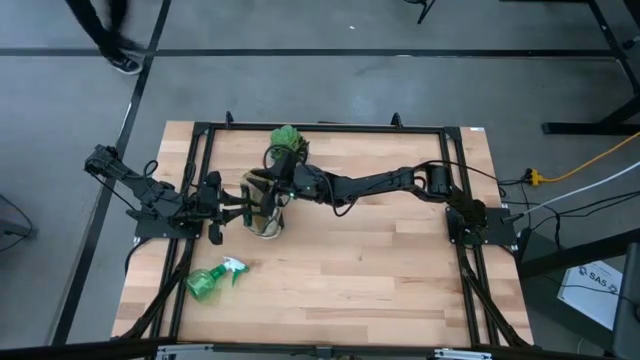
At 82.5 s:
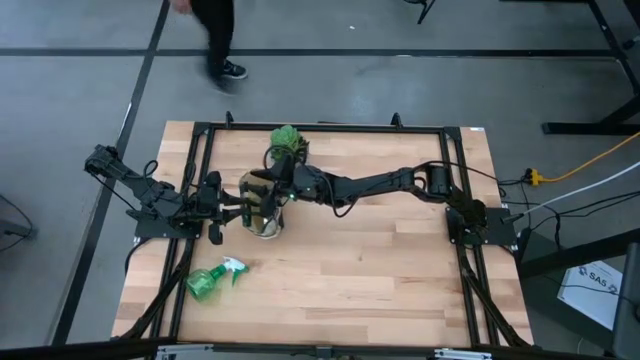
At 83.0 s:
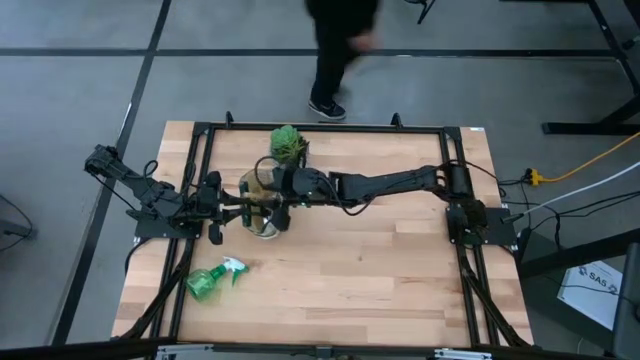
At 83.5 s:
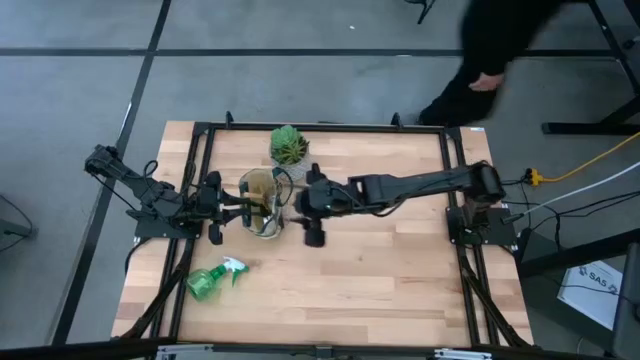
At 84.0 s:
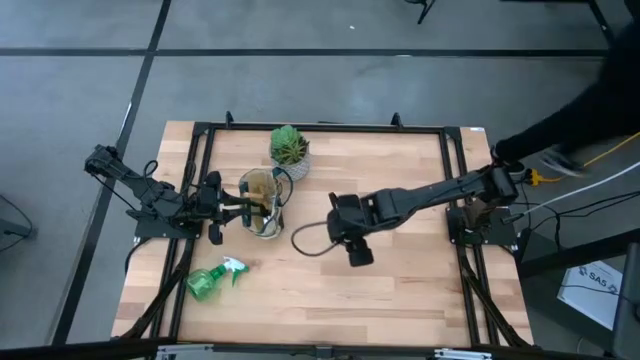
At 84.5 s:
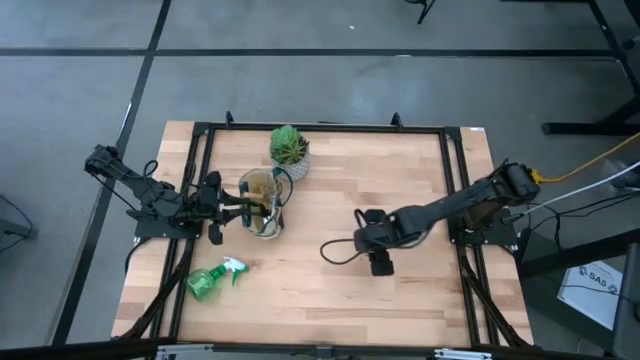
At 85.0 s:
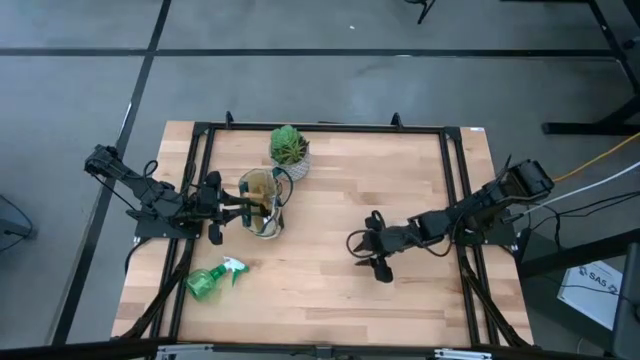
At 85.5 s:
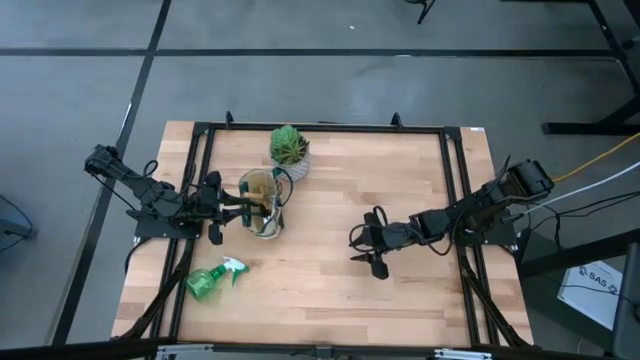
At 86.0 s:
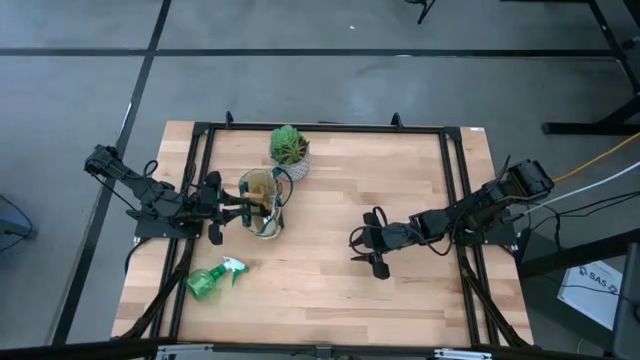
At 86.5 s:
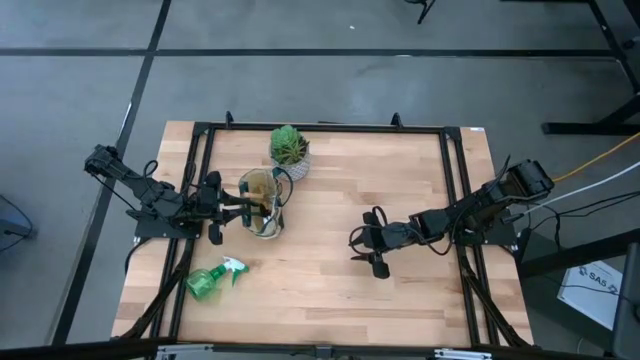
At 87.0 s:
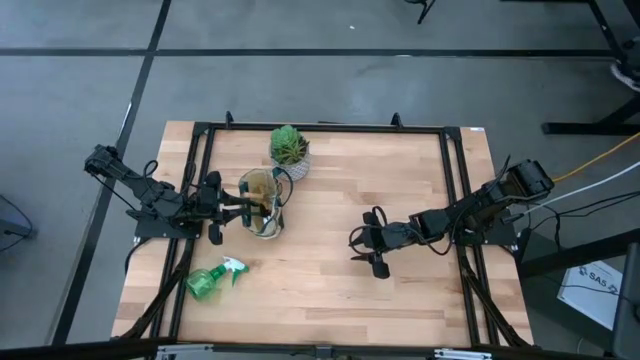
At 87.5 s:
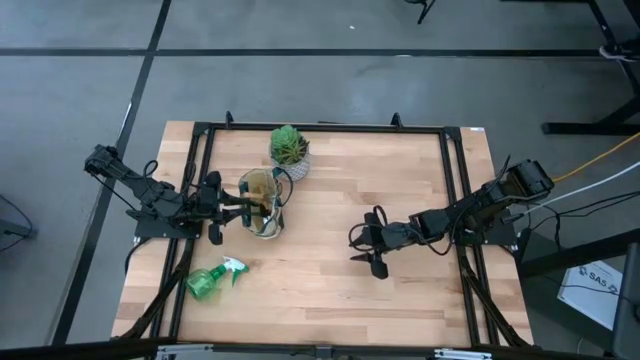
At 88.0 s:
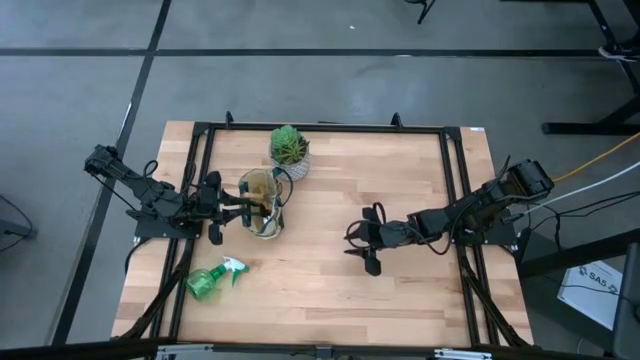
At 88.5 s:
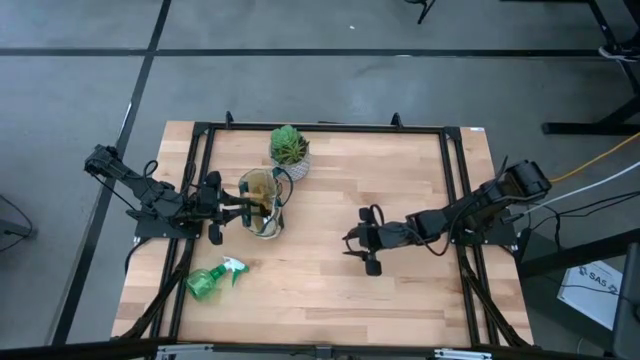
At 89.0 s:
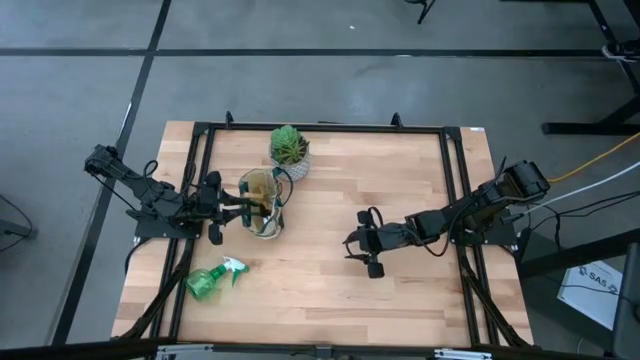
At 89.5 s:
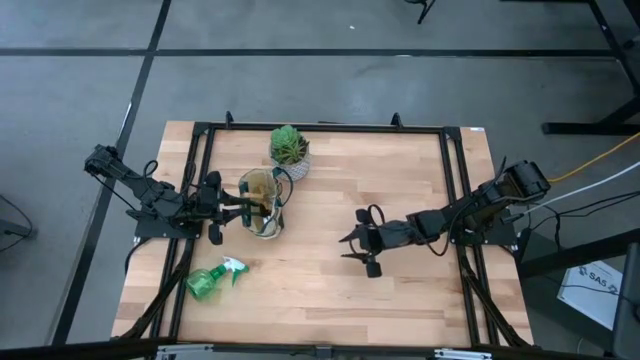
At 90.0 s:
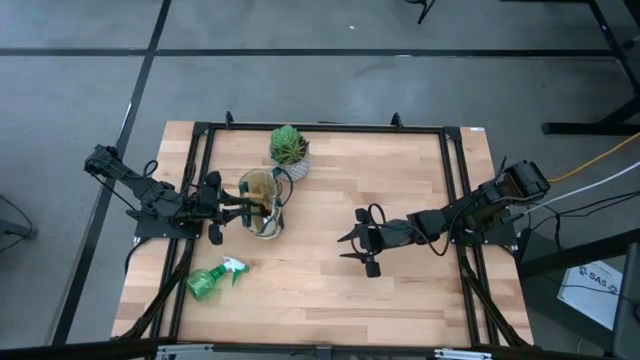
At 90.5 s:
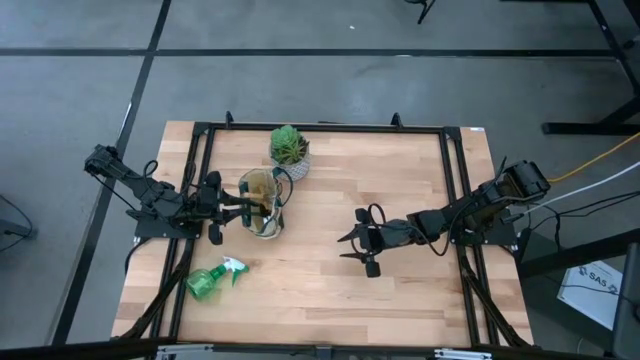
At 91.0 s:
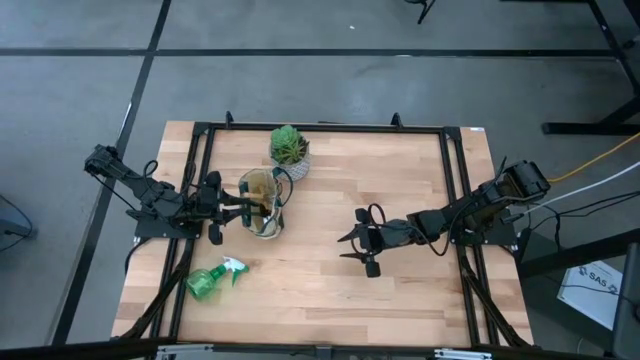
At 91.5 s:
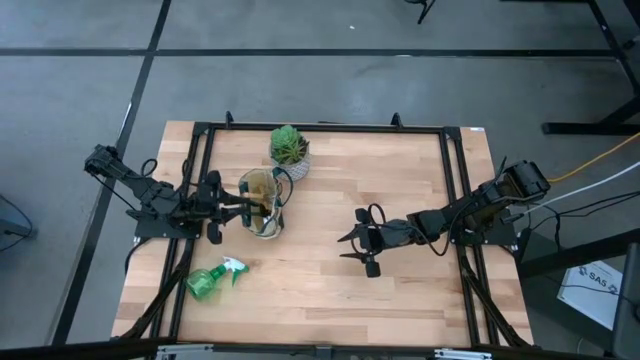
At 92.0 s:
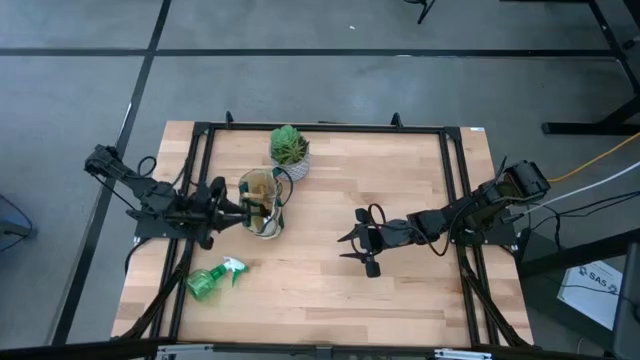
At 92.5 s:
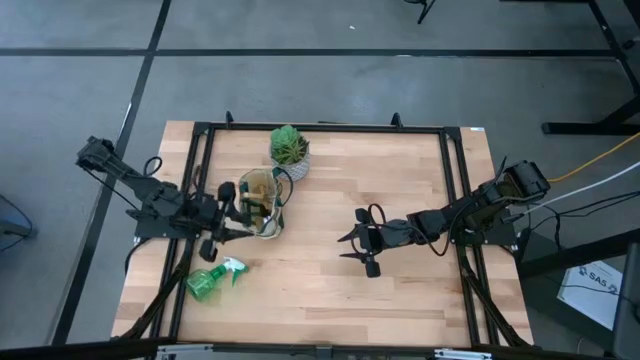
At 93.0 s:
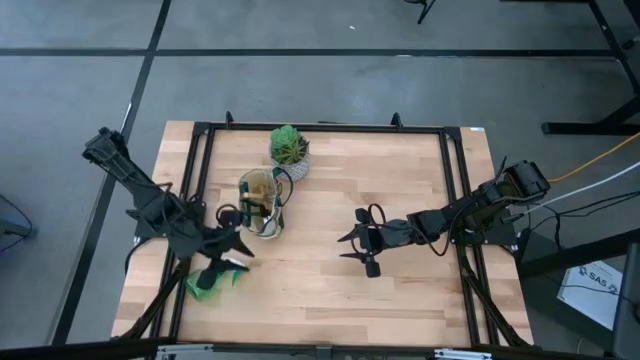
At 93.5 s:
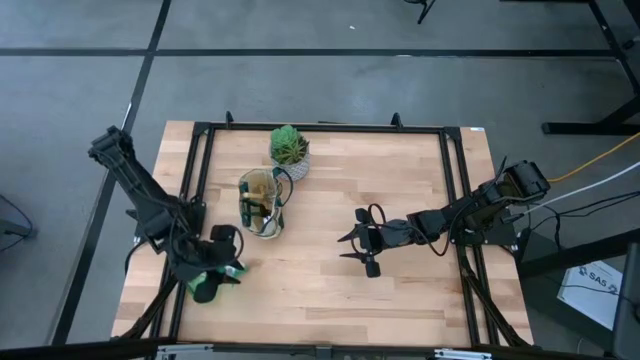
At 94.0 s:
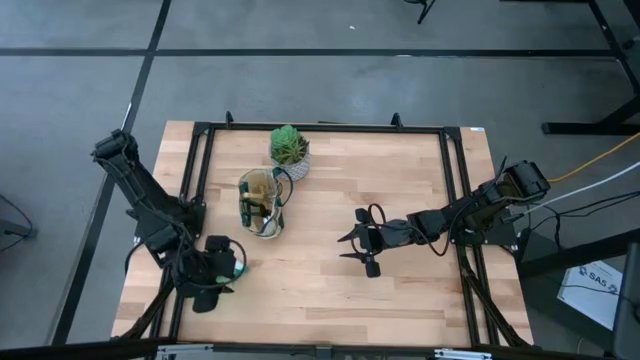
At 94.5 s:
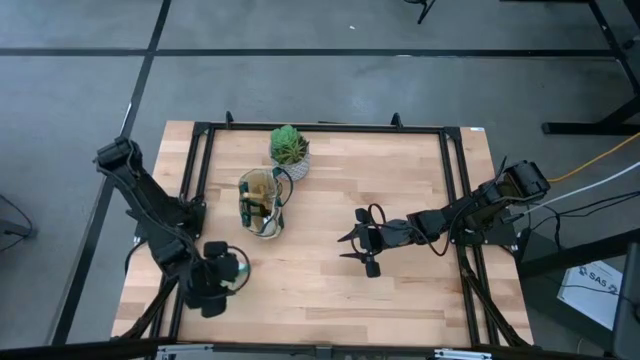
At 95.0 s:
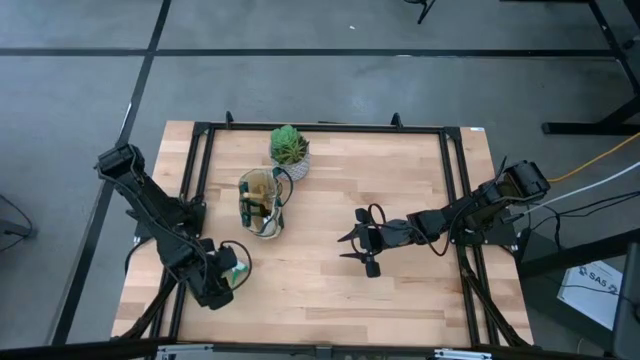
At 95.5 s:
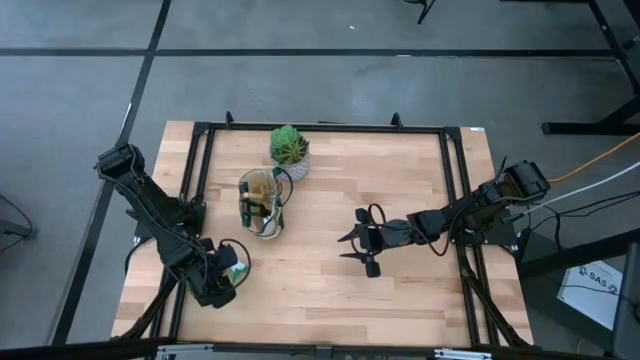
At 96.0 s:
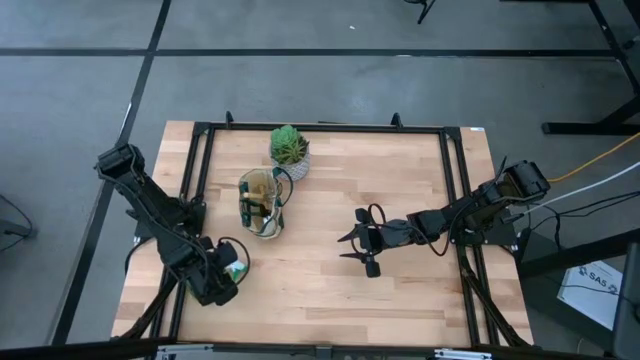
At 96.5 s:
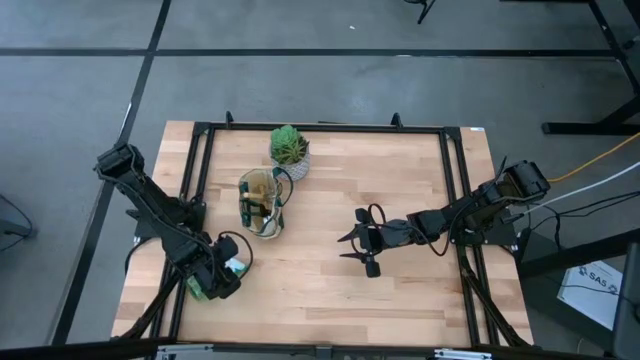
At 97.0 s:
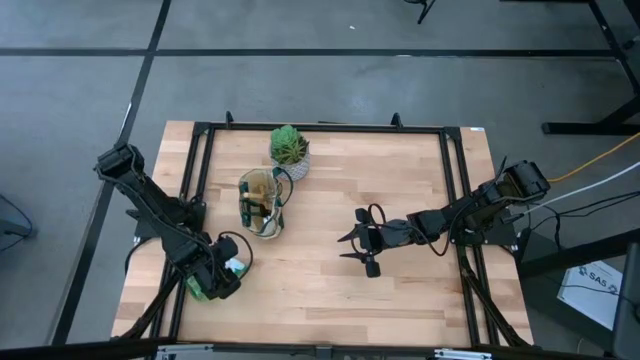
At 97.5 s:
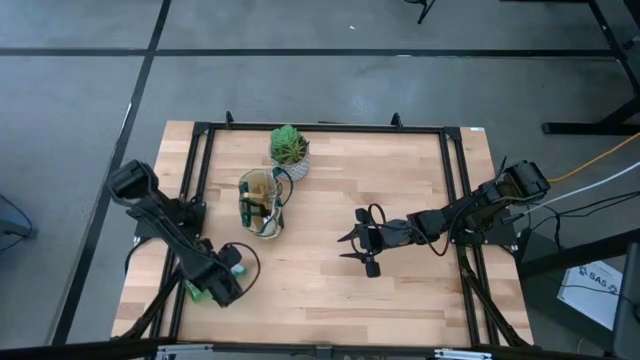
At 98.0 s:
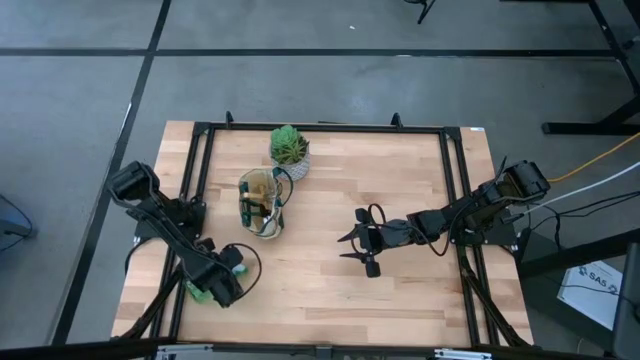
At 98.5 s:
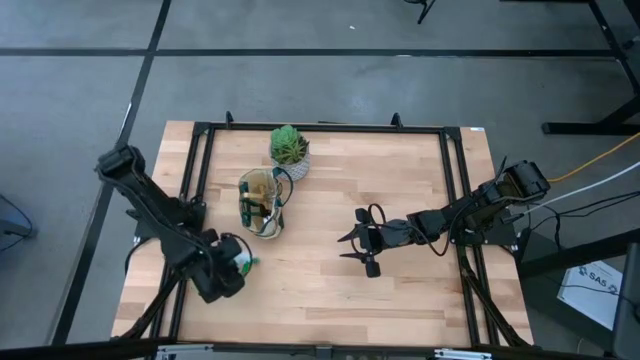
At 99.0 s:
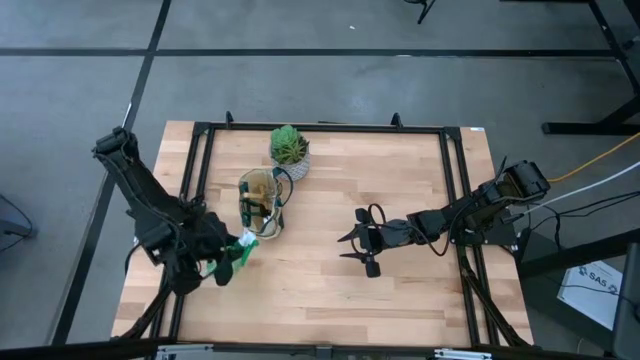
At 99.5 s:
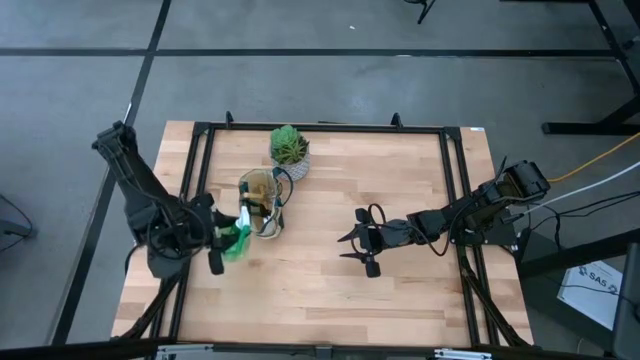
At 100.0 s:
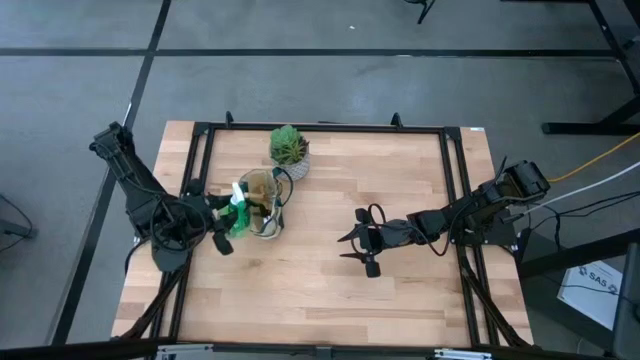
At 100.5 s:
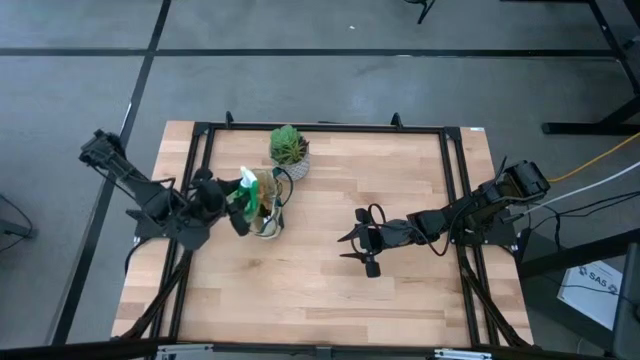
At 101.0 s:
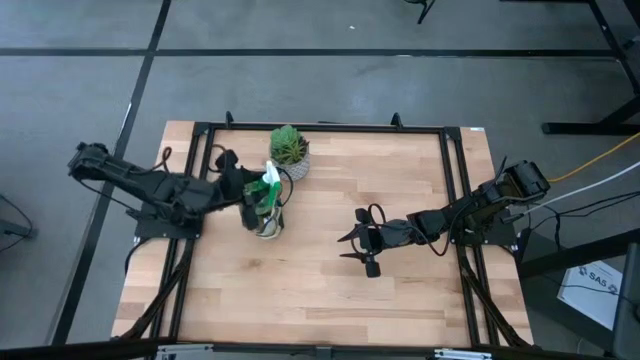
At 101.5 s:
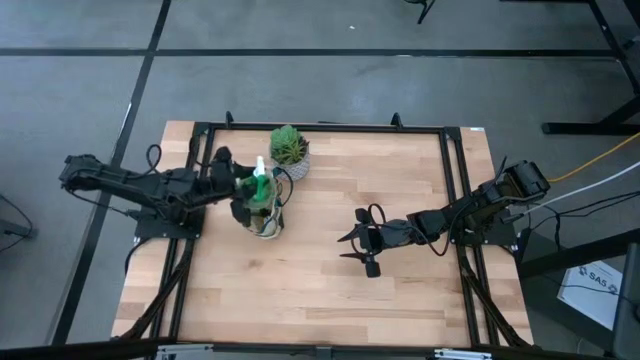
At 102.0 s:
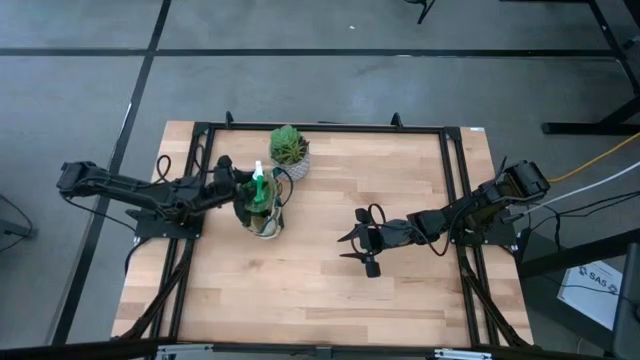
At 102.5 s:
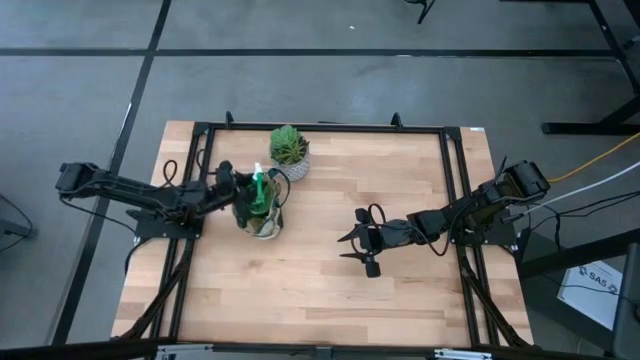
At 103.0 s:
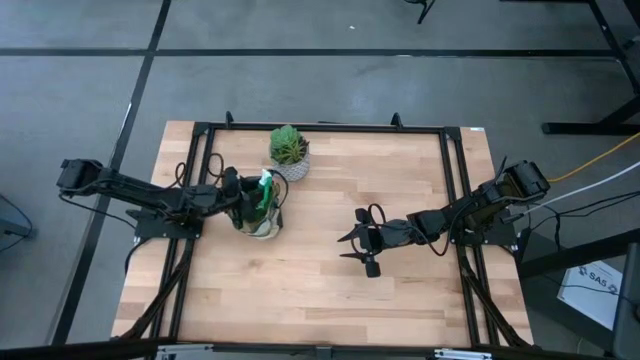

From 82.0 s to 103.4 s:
Task: Pick & Place Garden tools in Gardening bag
Put the green bottle spray into the gardening bag
